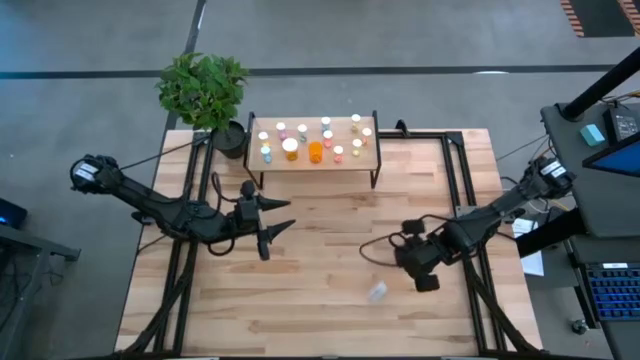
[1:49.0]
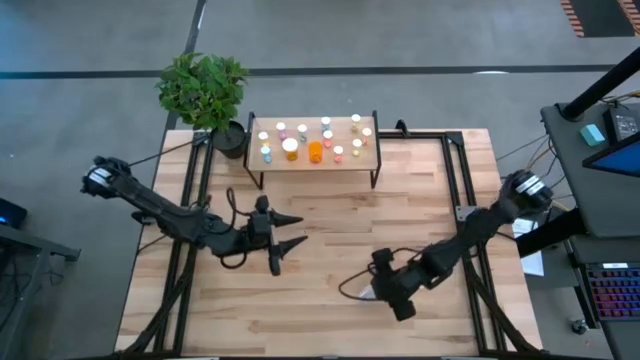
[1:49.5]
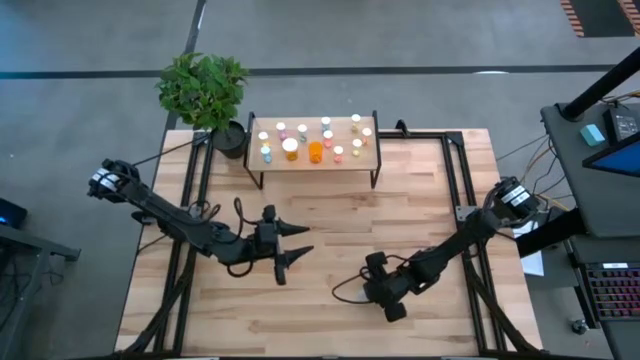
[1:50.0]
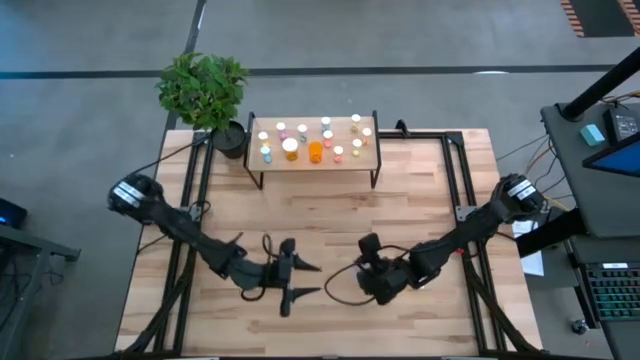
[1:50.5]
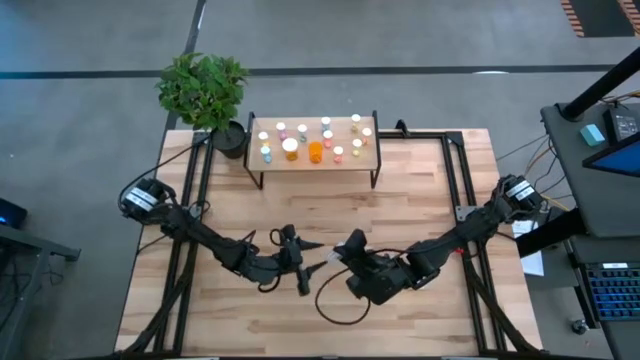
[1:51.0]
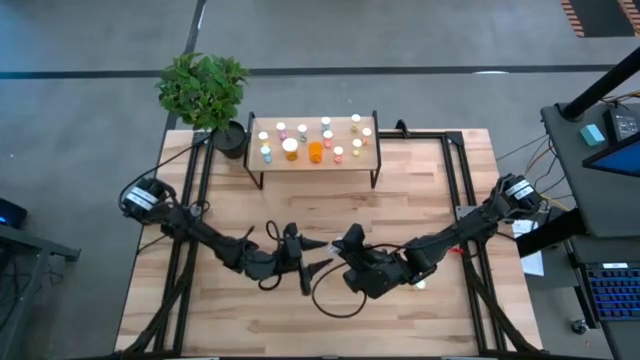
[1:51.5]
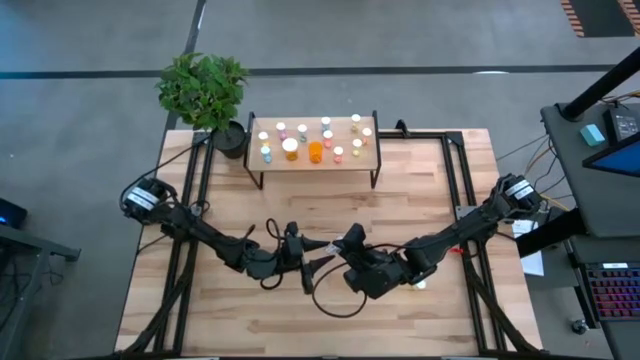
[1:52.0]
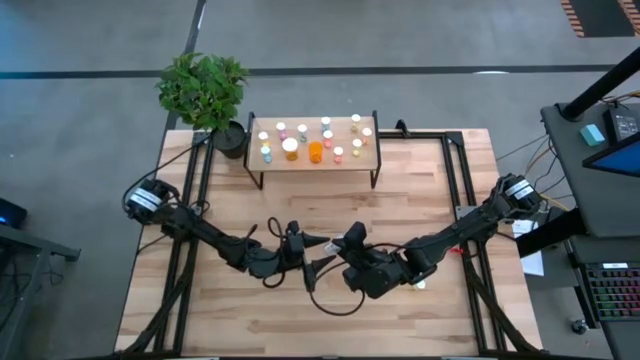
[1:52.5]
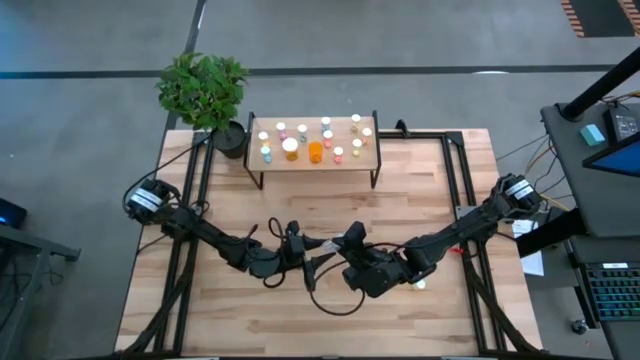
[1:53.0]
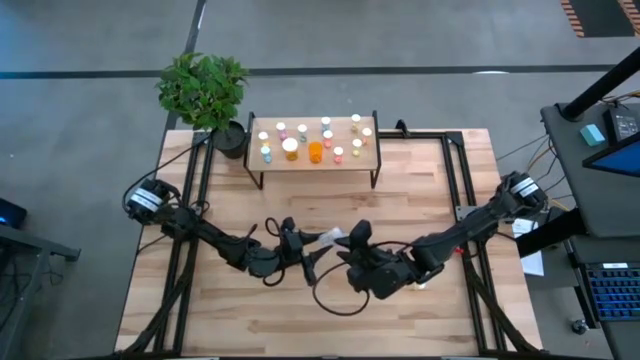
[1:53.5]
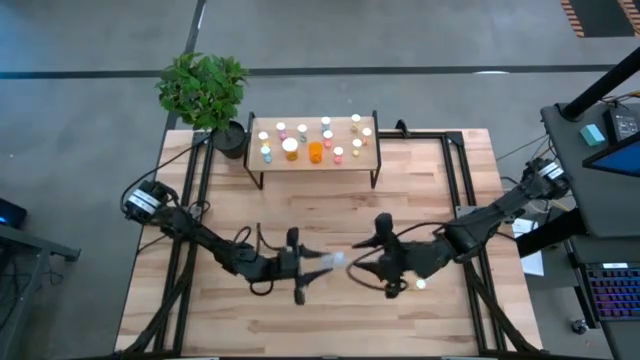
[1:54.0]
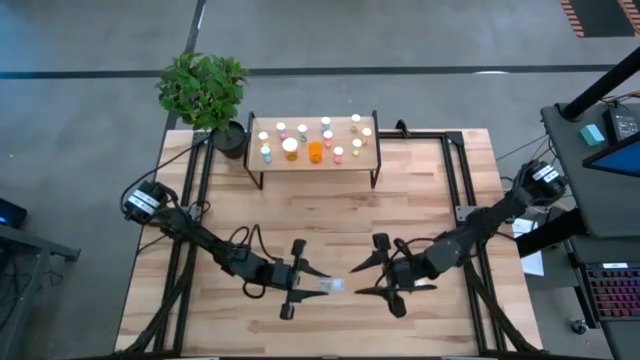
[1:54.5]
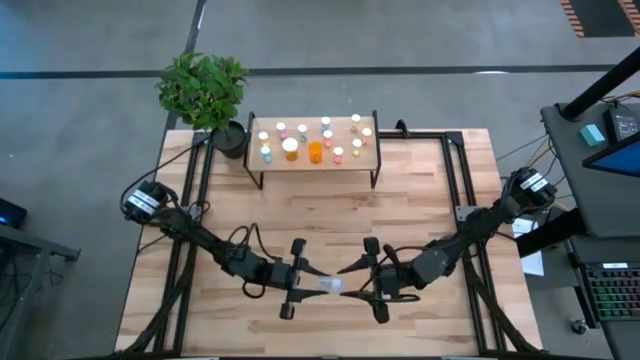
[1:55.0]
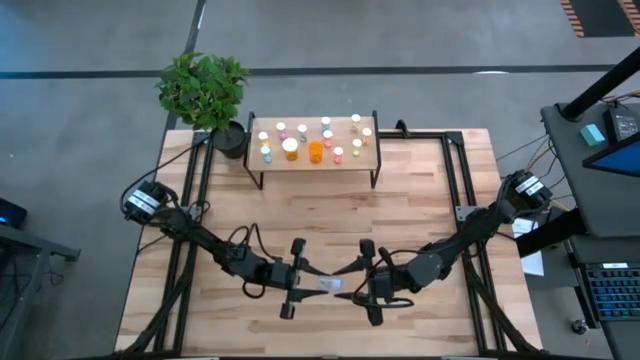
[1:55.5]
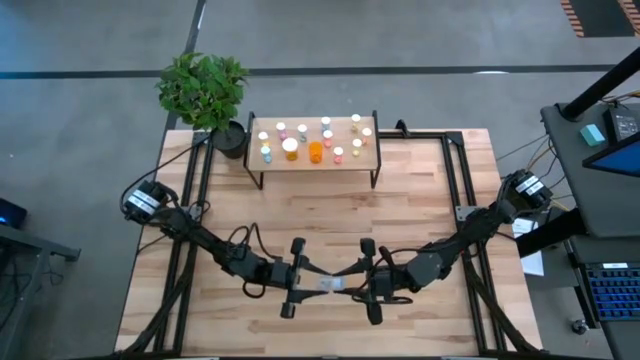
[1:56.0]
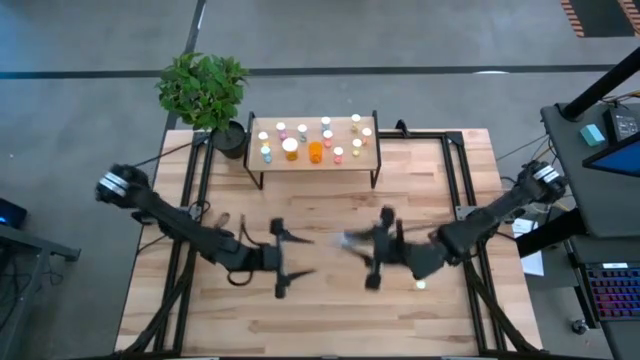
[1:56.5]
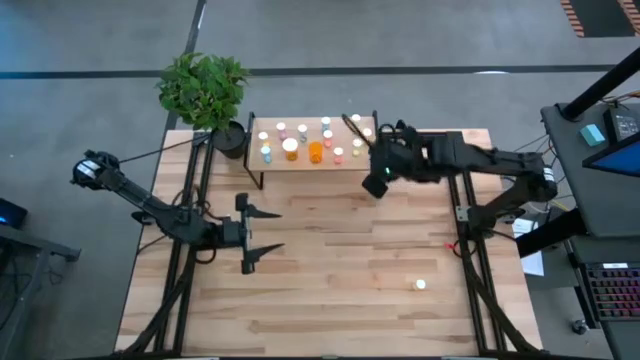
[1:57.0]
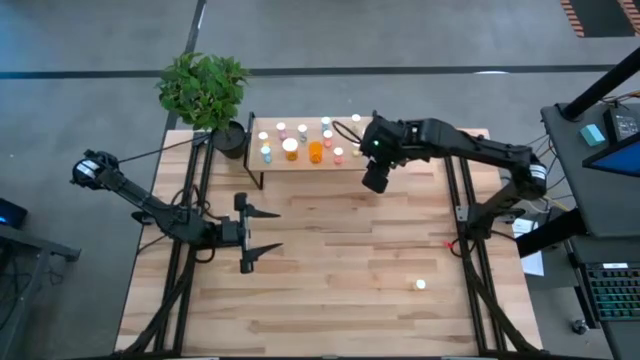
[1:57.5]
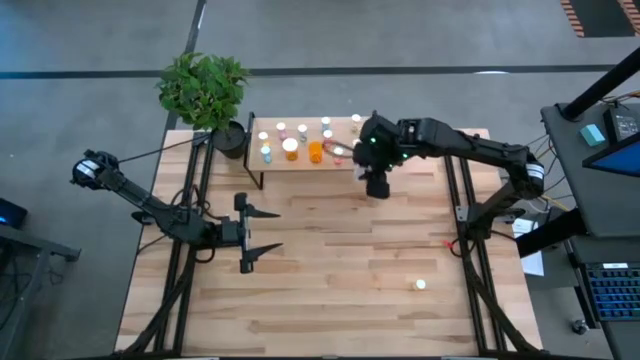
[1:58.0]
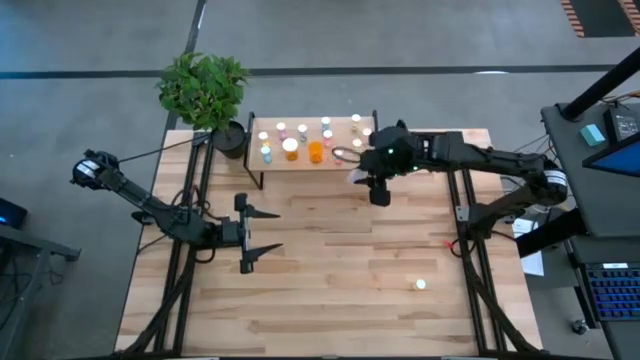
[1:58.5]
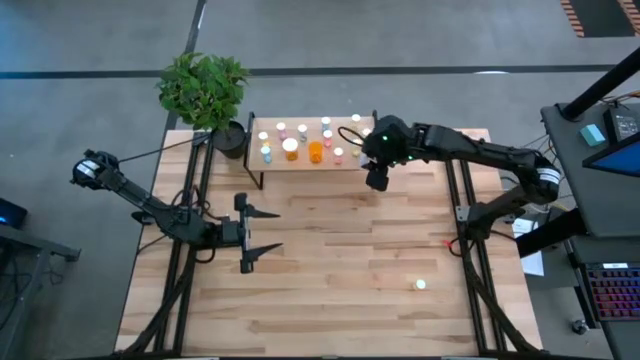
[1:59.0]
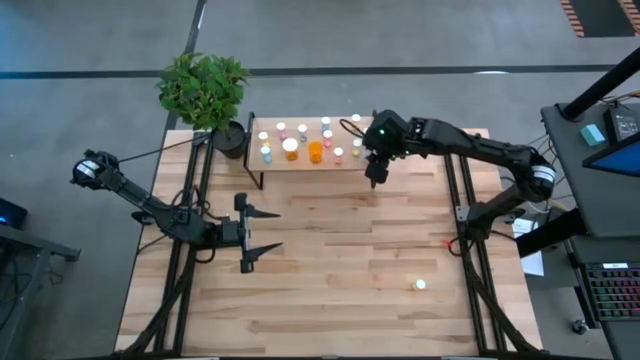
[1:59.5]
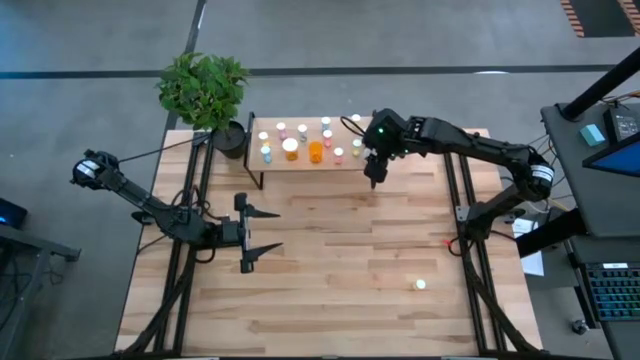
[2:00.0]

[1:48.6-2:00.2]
Task: Pick and place medicine bottles onto shelf by color
Put the transparent pill bottle on the shelf

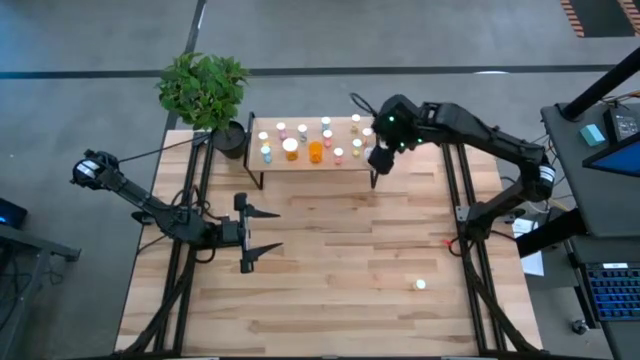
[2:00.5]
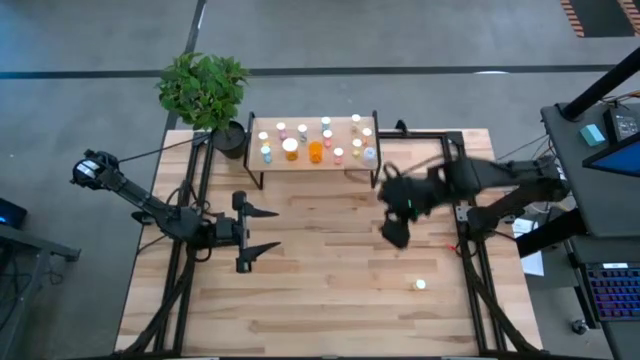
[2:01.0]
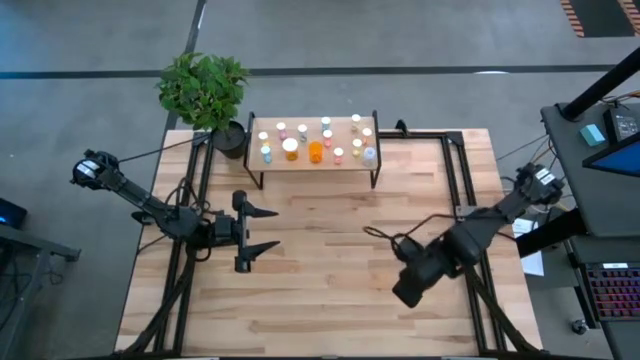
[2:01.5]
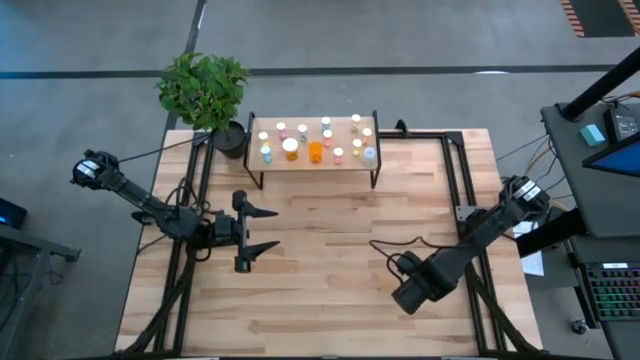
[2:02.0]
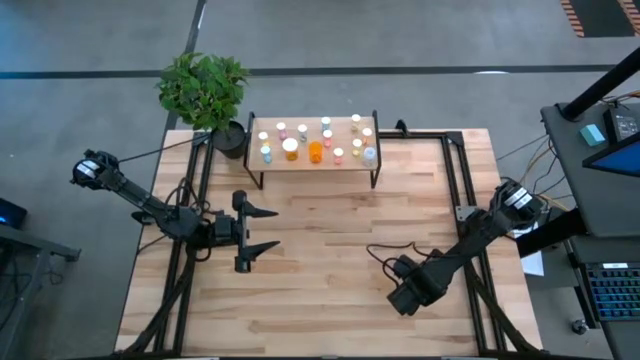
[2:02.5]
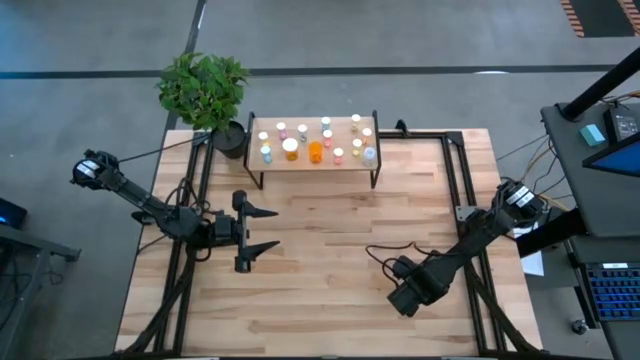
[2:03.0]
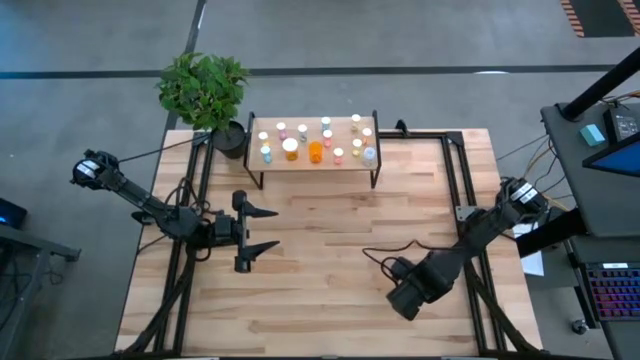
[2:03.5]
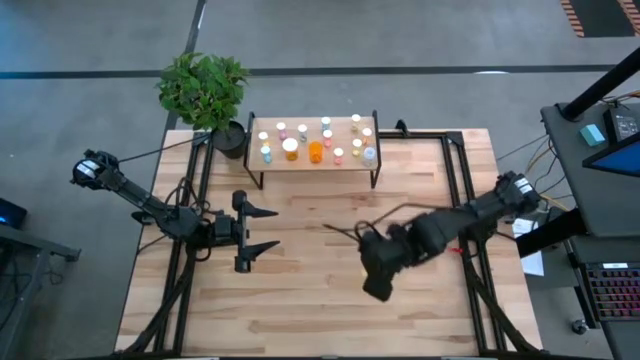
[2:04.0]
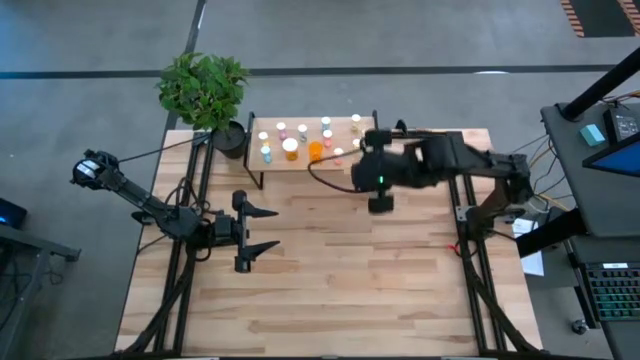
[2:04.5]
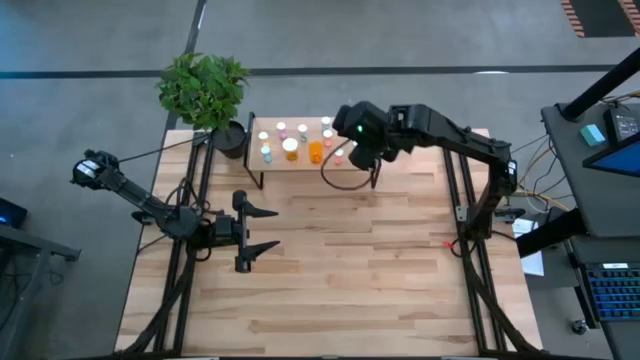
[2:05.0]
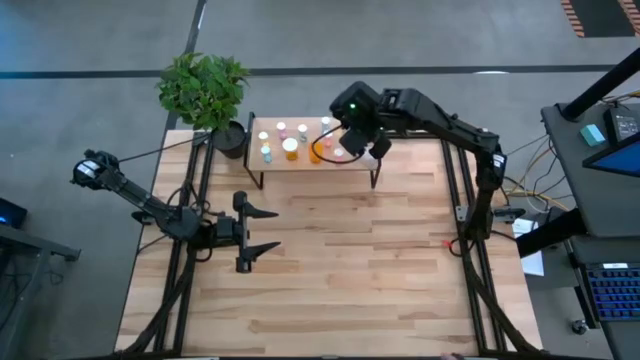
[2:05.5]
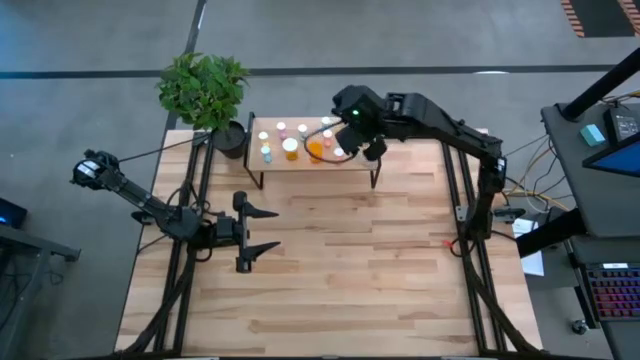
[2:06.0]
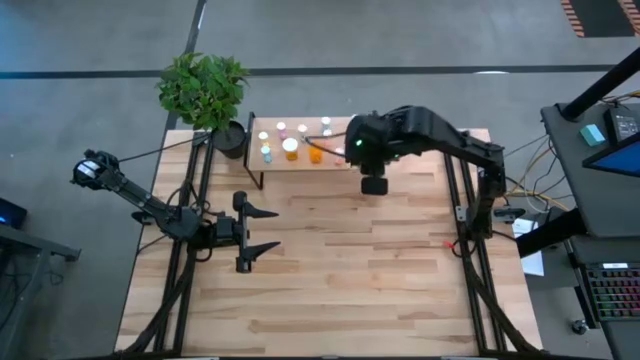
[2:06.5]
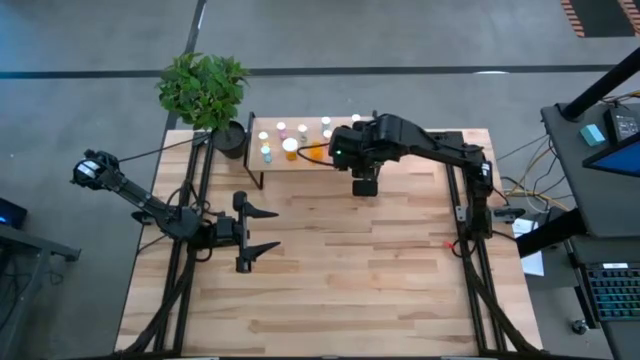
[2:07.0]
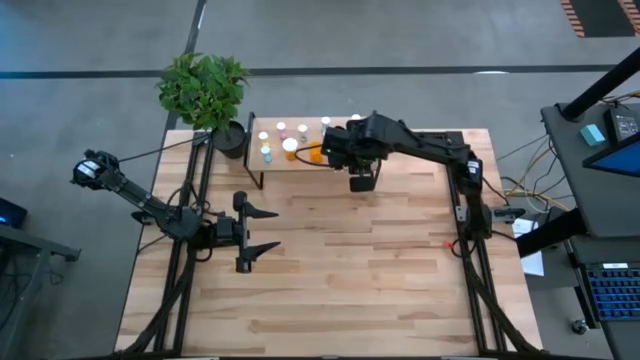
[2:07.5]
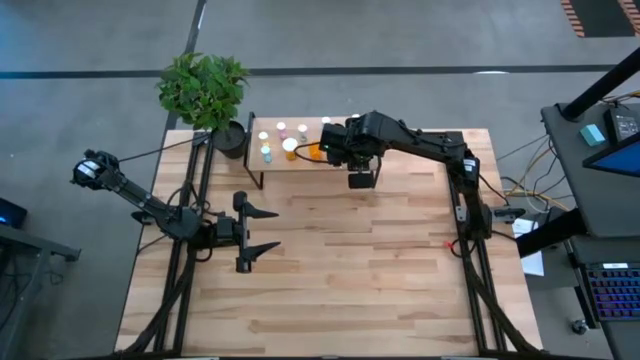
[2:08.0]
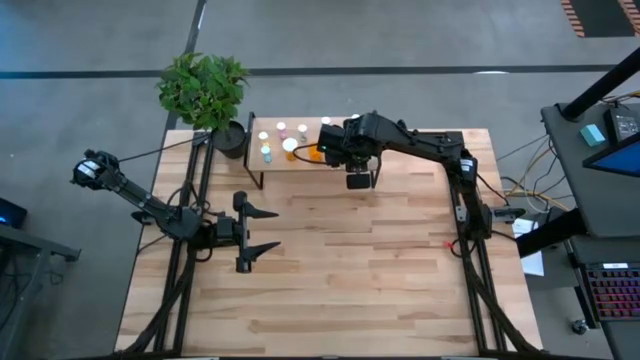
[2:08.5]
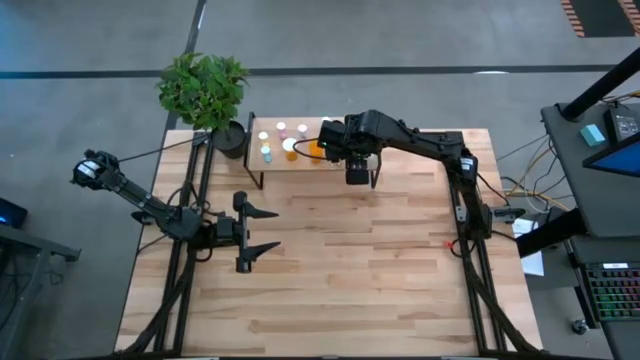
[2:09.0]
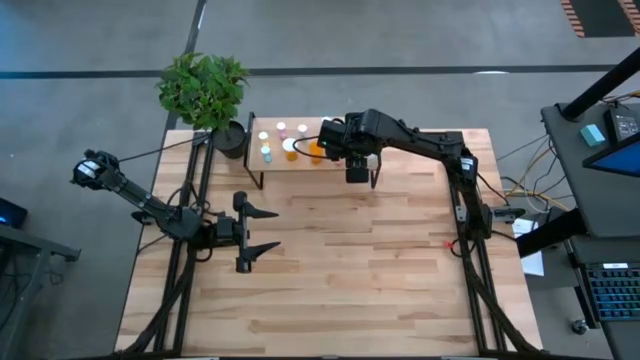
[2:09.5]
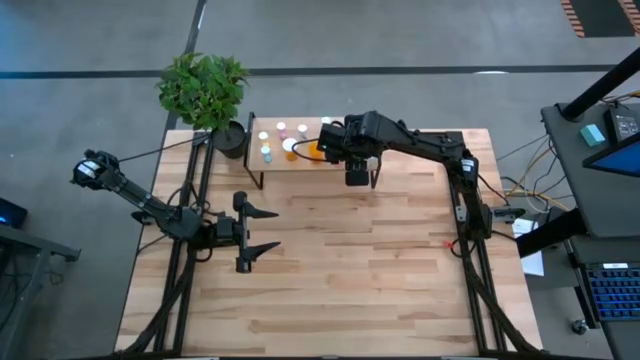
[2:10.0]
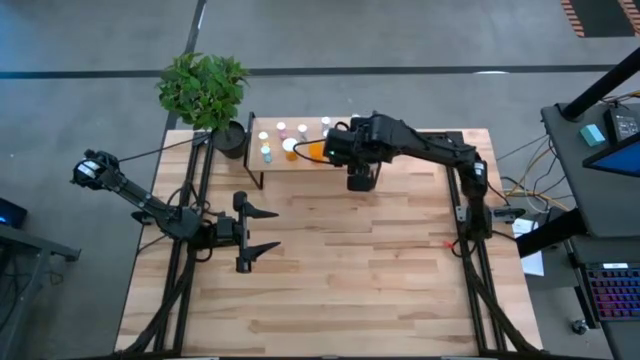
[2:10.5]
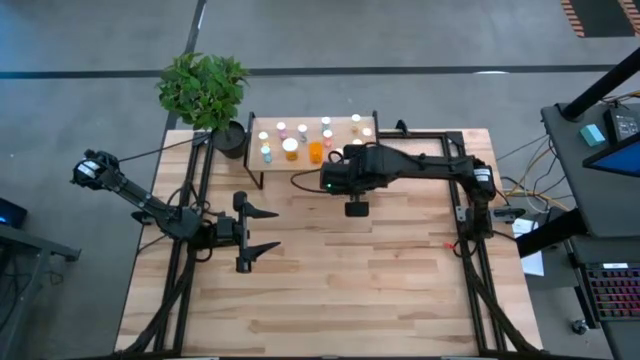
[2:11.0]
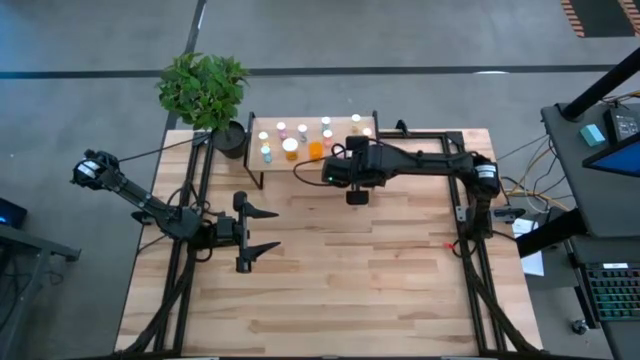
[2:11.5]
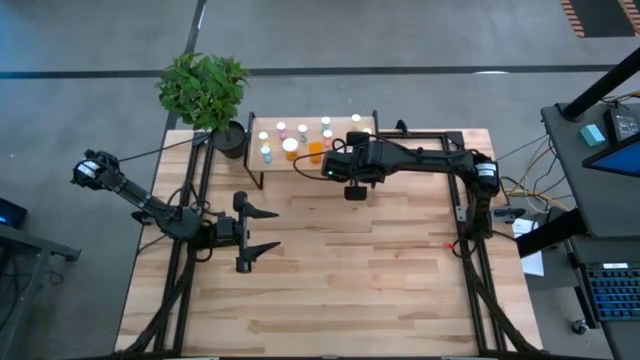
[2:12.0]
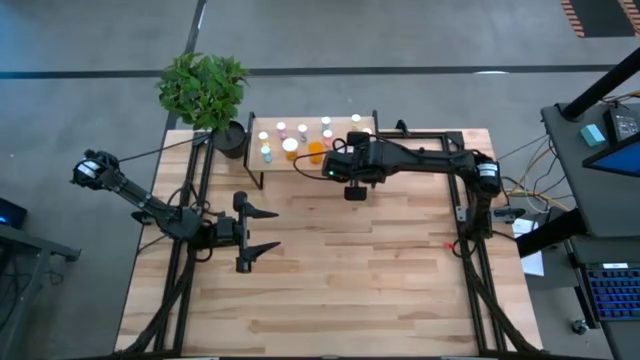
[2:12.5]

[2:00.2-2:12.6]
Put the yellow pill bottle on the shelf
